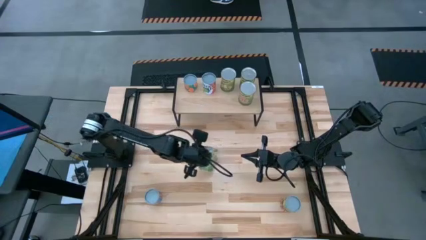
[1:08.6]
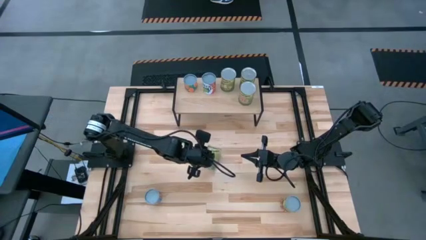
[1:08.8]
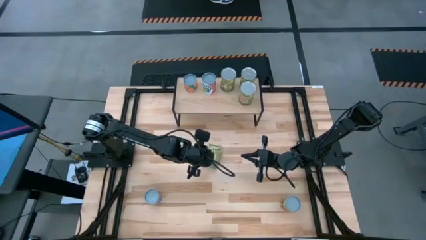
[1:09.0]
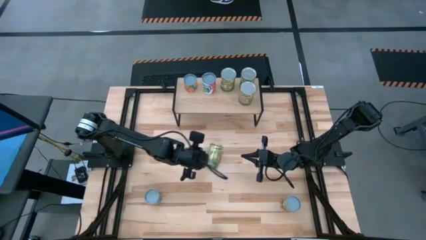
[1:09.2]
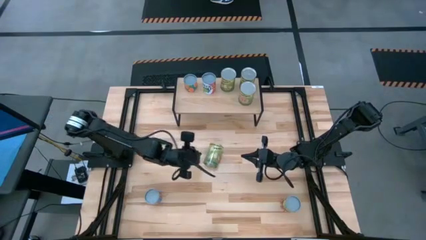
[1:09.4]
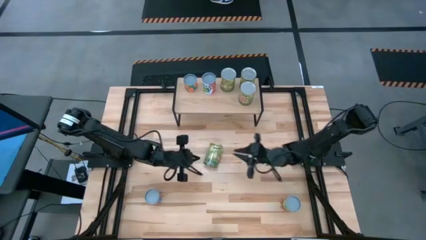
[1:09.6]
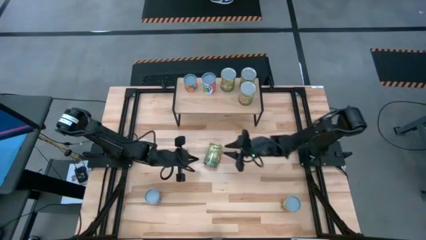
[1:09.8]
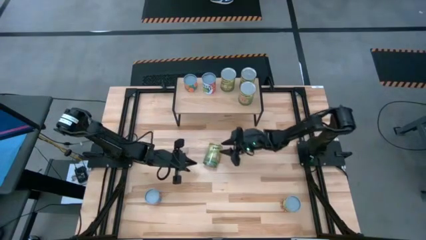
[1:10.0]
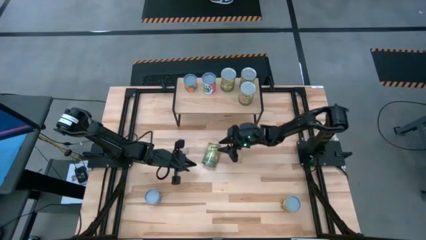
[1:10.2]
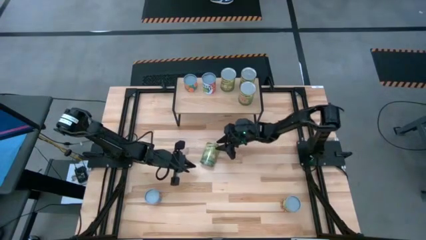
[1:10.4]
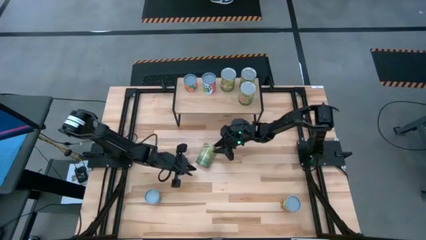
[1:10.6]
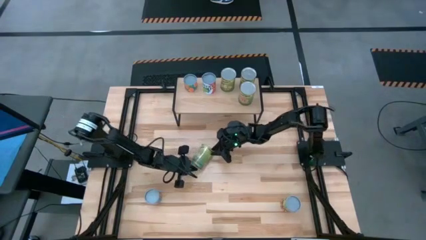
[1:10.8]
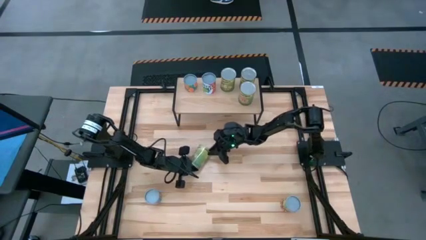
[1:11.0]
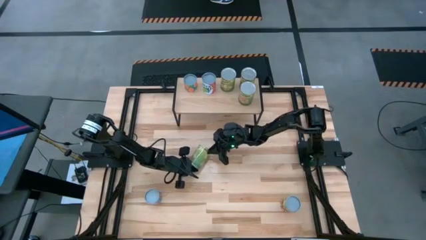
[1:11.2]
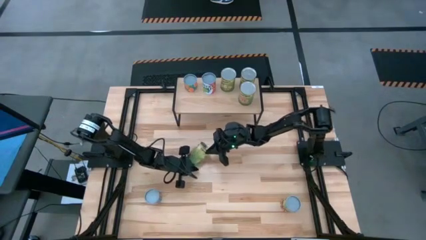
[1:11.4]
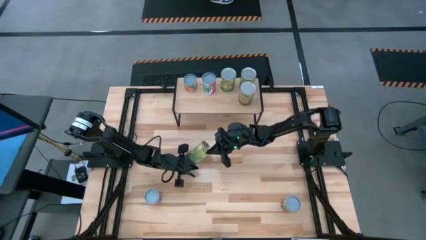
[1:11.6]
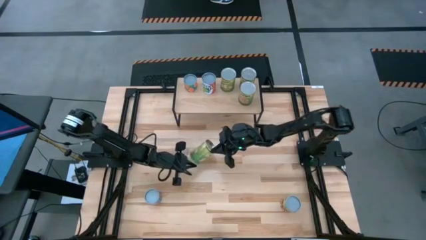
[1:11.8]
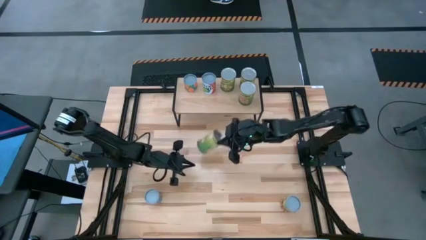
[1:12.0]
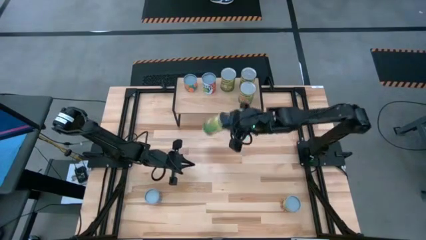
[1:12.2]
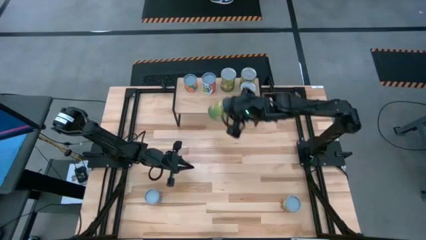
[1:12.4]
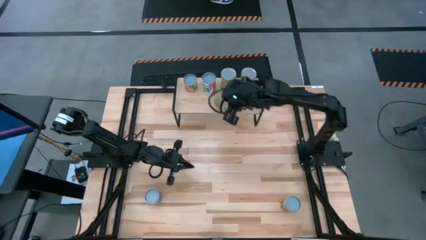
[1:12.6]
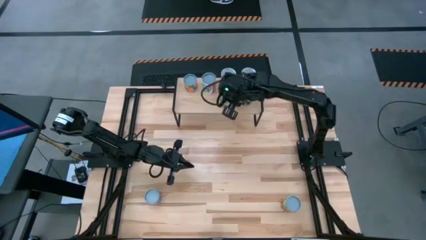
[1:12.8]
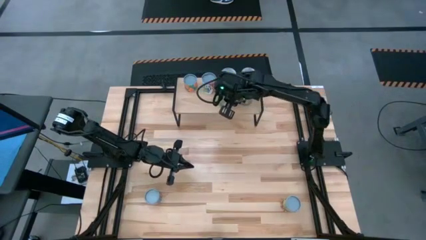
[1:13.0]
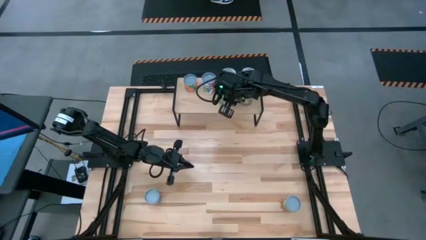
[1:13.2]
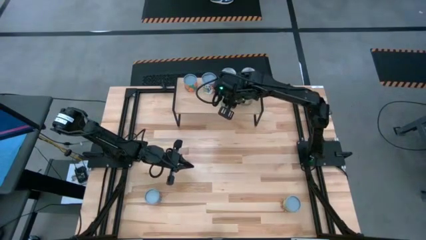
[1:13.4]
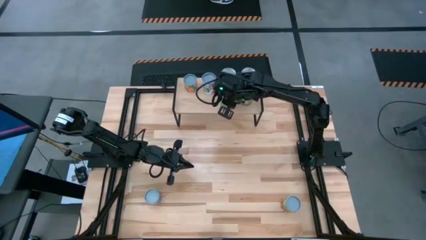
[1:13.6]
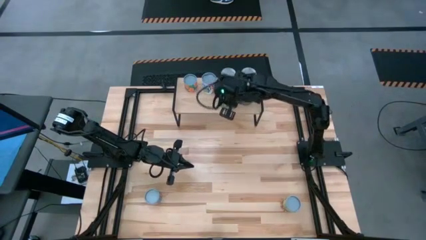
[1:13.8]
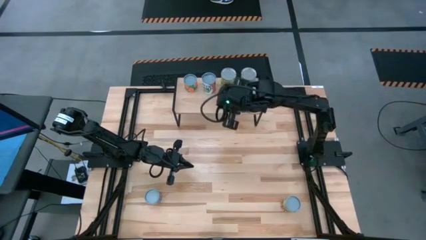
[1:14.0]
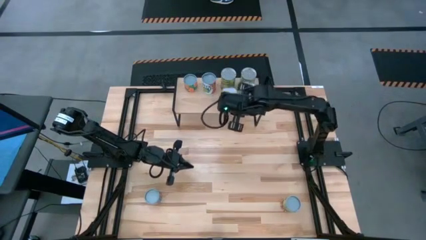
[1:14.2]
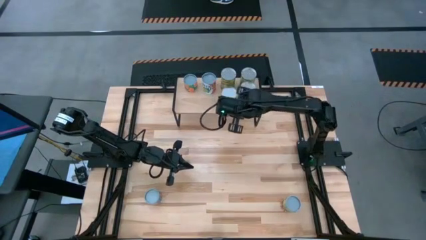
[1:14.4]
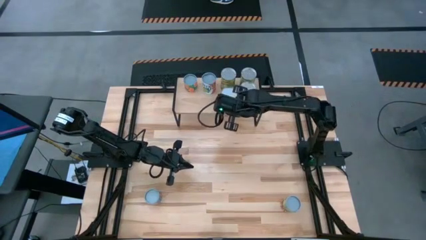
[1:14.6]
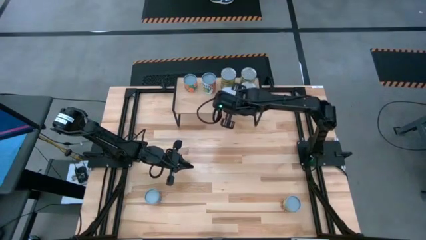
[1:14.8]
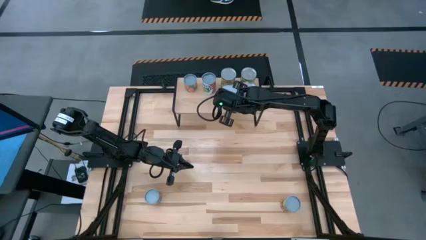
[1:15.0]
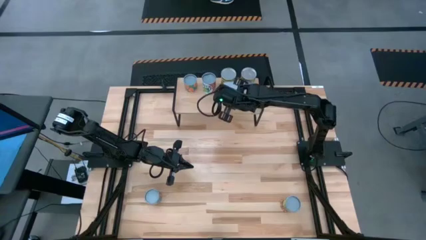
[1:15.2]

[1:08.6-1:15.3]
Task: Pick and place cans onto a shelf
Put the canned pears on the shelf

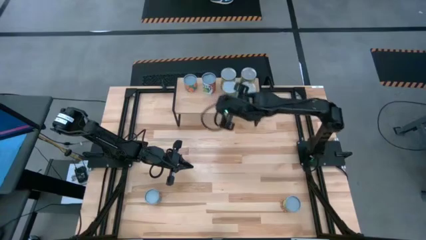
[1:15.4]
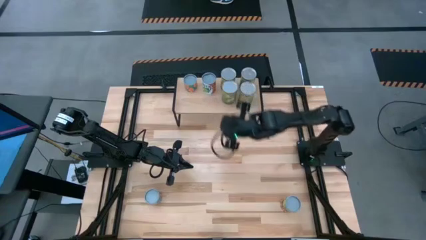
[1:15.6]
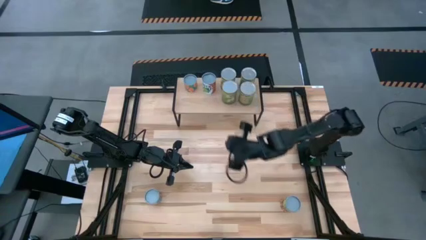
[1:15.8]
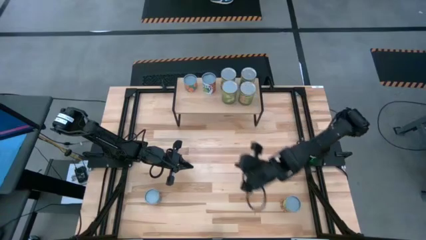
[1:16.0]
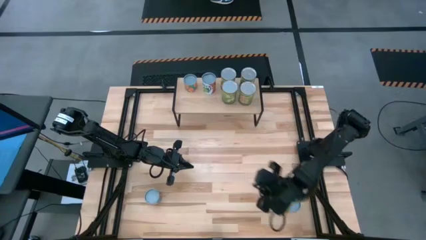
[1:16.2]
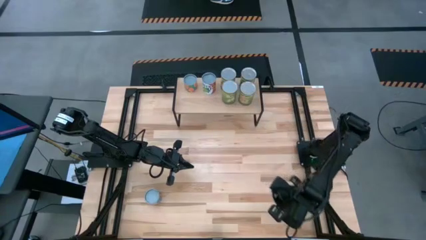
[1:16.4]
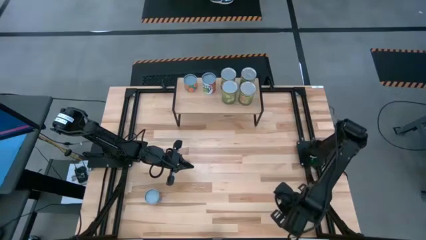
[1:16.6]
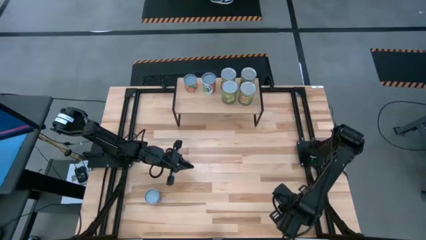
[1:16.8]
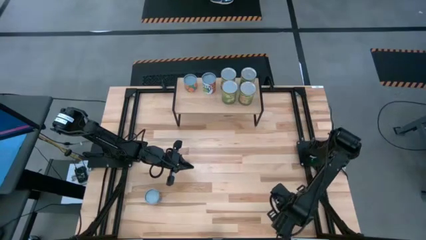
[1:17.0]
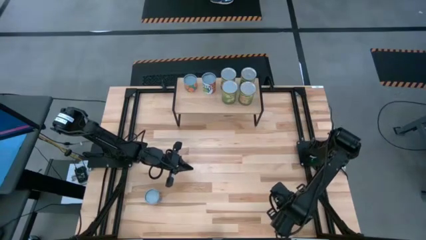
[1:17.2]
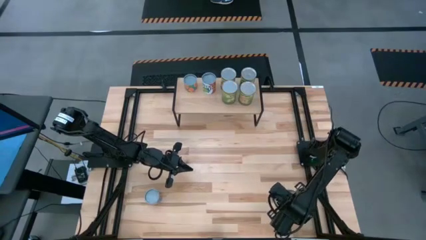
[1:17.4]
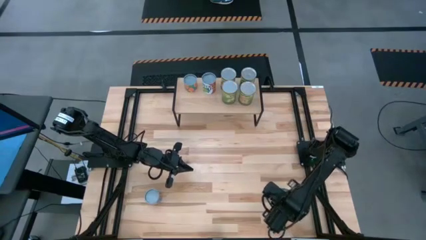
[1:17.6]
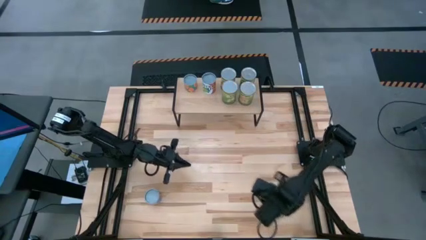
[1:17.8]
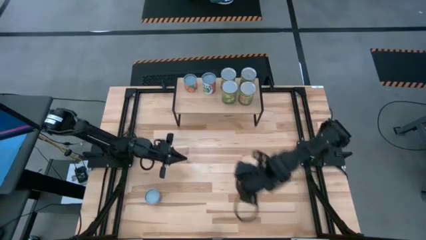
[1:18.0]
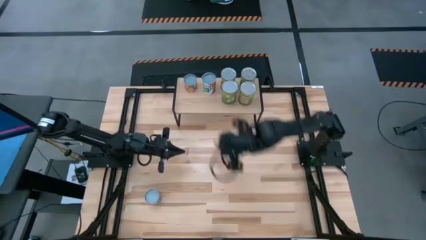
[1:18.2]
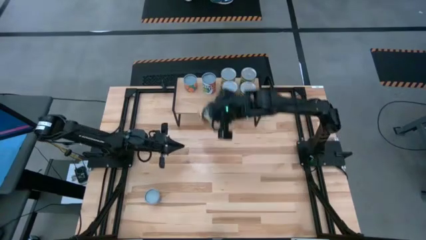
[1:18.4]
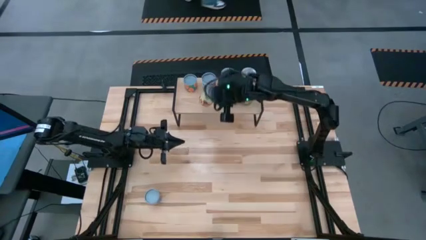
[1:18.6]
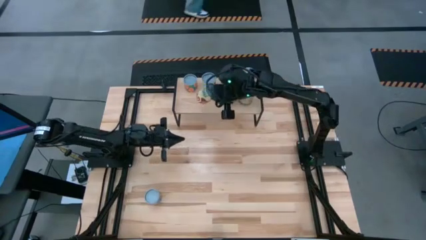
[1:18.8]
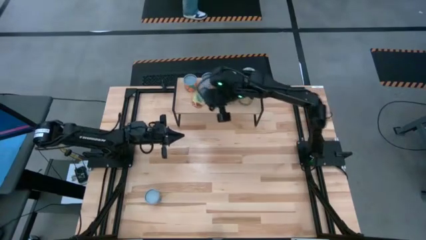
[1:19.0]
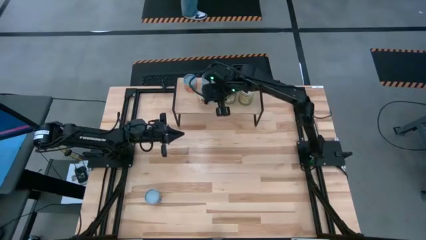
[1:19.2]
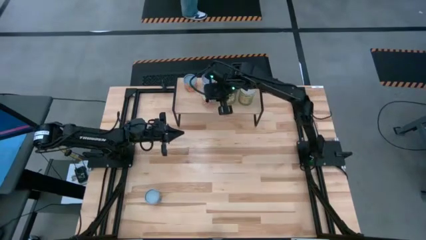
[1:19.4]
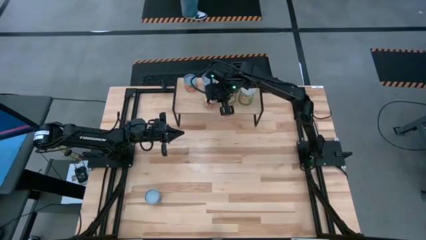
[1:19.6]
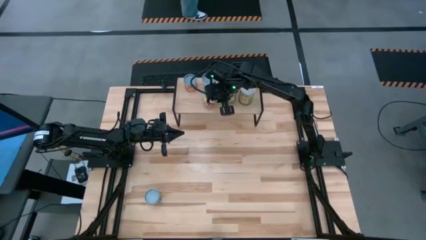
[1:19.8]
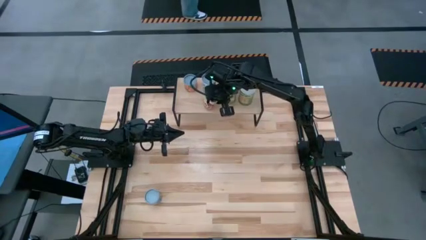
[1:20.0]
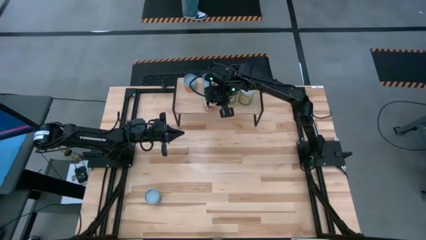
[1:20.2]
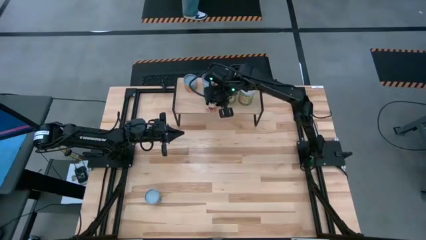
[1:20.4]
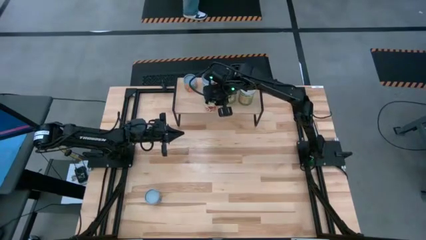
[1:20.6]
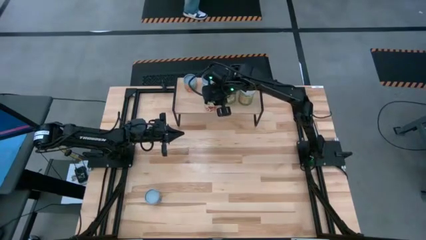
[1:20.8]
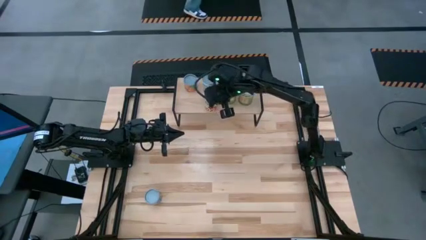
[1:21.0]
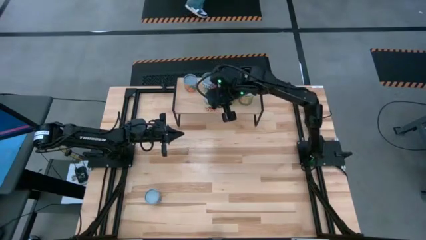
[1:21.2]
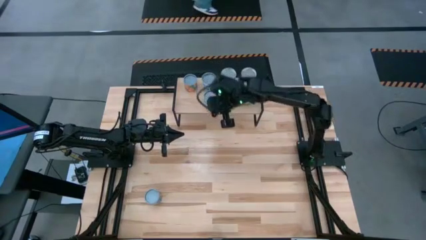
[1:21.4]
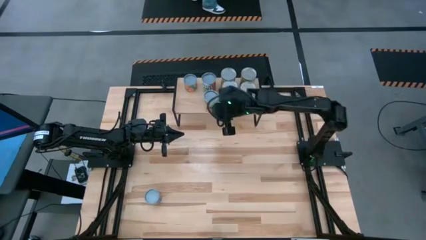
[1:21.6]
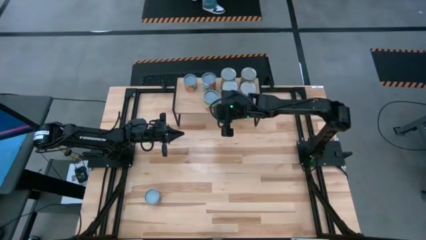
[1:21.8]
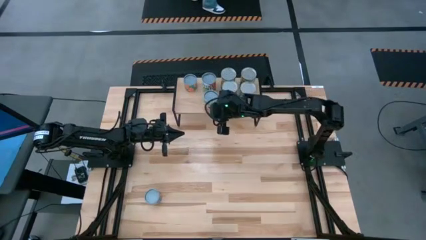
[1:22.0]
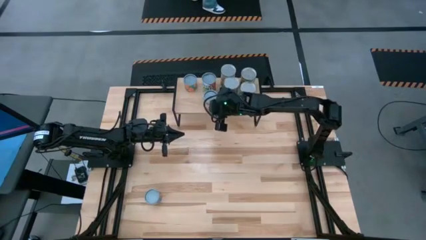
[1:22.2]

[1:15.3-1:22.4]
Put the canned spaghetti sauce on the shelf
